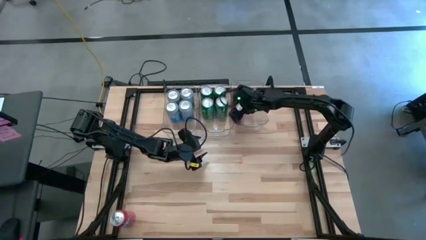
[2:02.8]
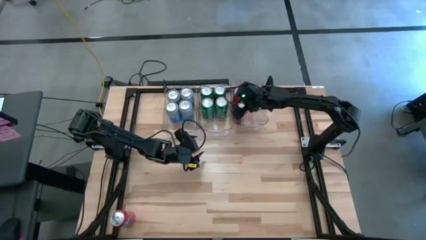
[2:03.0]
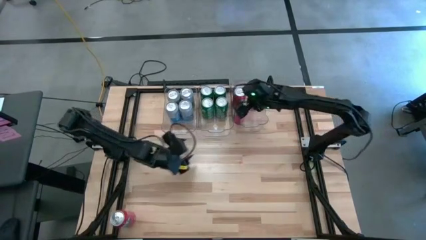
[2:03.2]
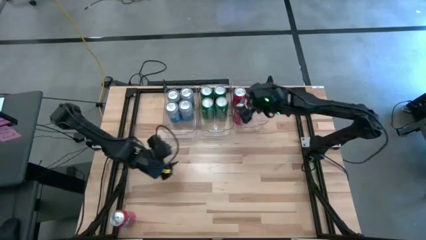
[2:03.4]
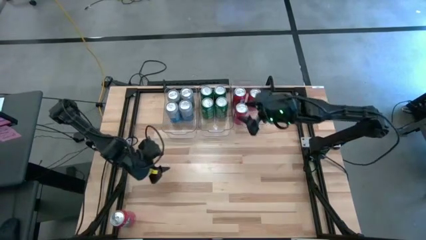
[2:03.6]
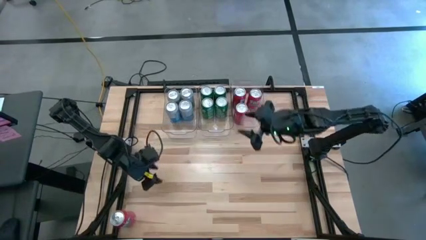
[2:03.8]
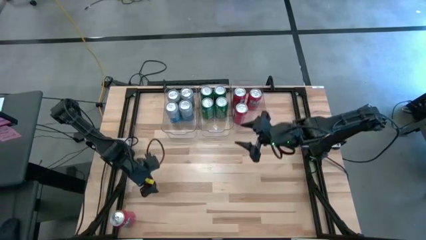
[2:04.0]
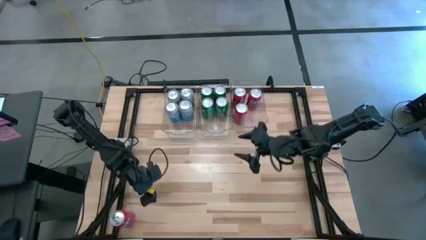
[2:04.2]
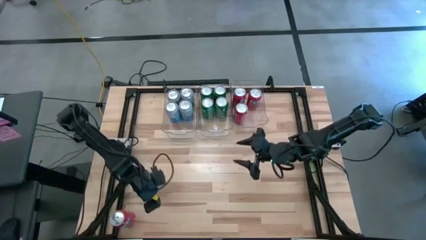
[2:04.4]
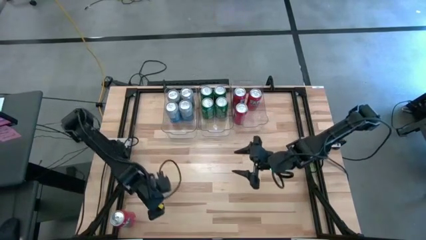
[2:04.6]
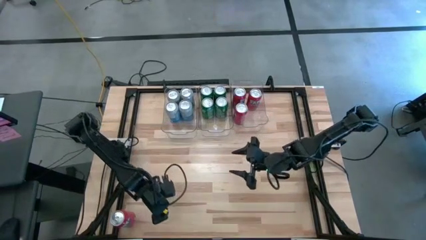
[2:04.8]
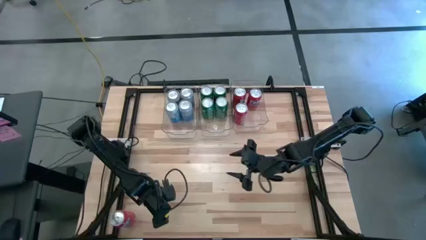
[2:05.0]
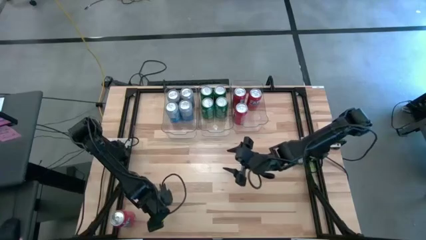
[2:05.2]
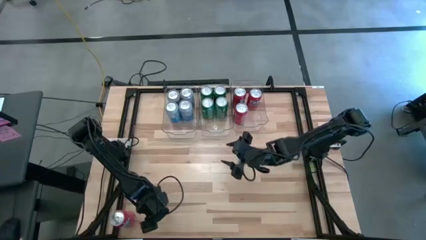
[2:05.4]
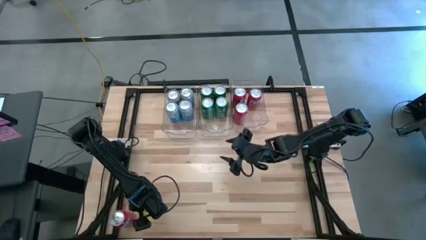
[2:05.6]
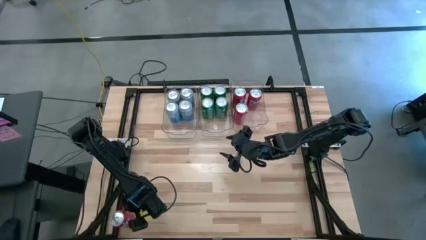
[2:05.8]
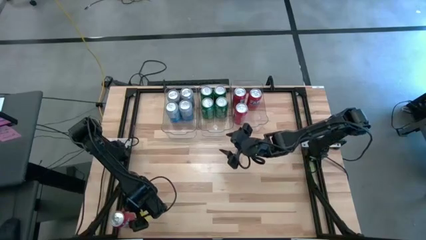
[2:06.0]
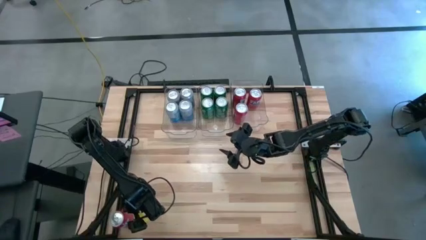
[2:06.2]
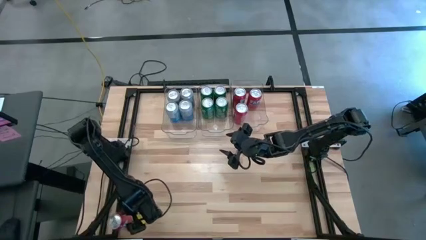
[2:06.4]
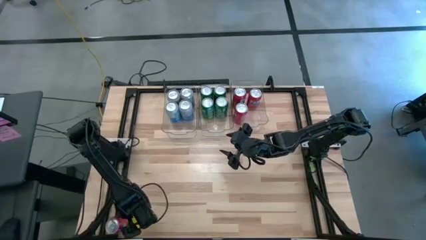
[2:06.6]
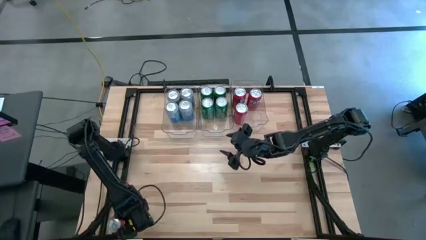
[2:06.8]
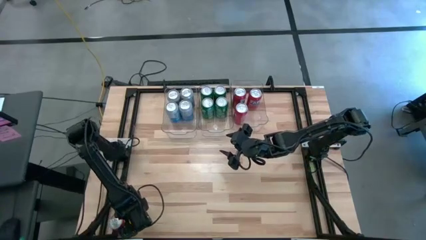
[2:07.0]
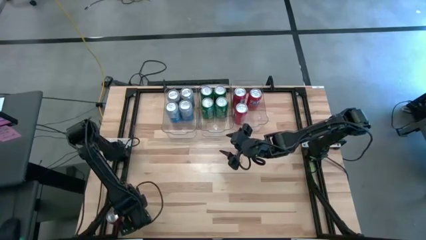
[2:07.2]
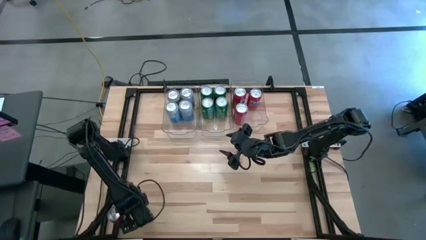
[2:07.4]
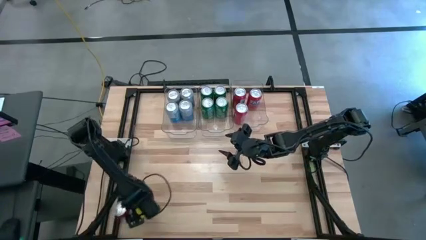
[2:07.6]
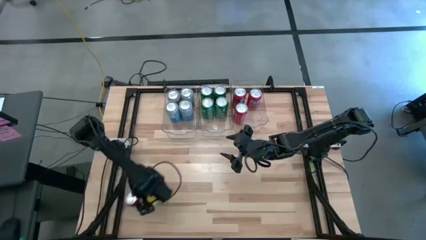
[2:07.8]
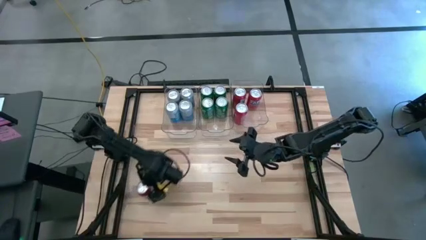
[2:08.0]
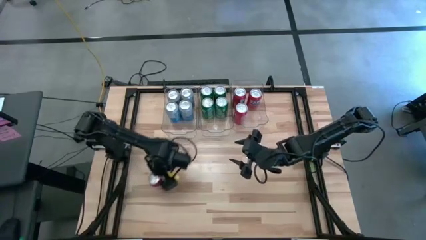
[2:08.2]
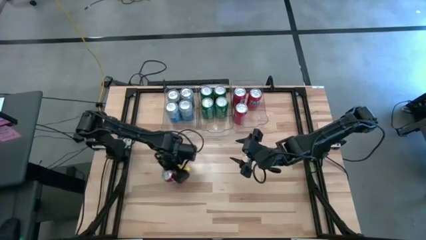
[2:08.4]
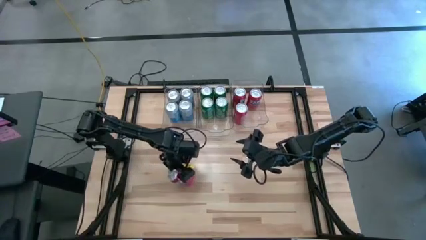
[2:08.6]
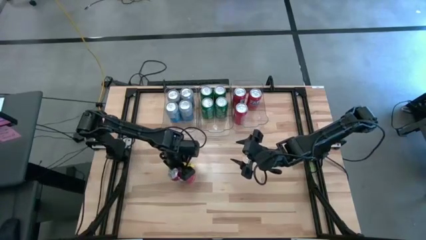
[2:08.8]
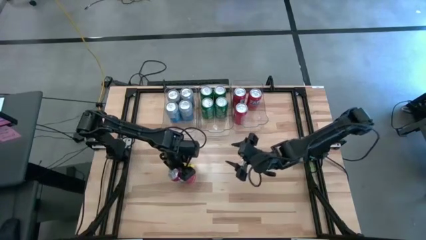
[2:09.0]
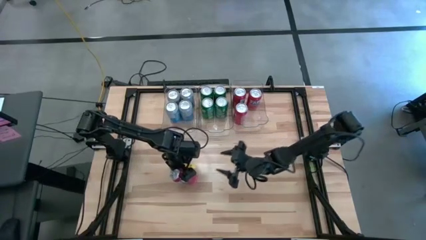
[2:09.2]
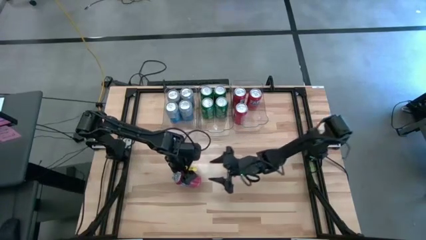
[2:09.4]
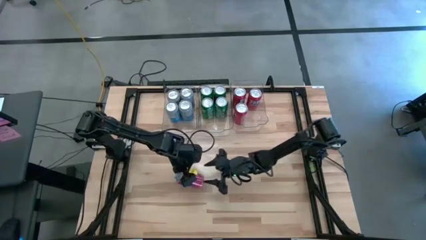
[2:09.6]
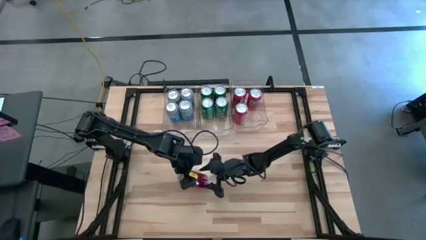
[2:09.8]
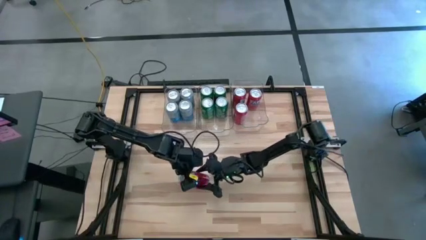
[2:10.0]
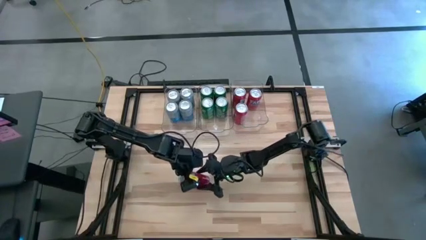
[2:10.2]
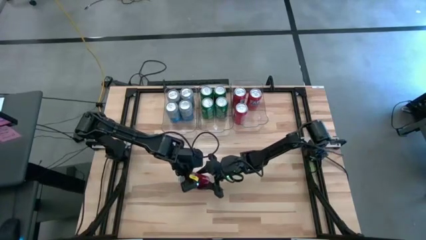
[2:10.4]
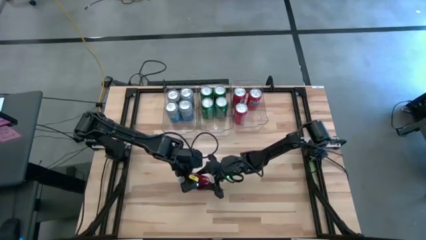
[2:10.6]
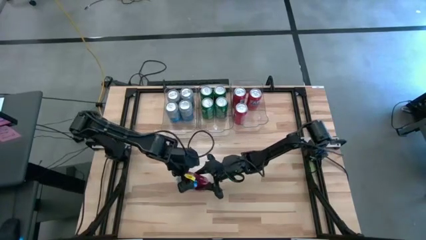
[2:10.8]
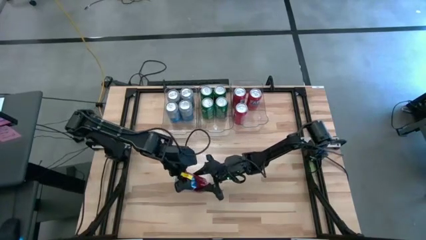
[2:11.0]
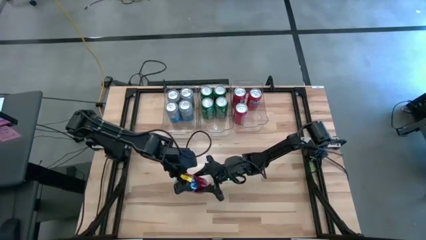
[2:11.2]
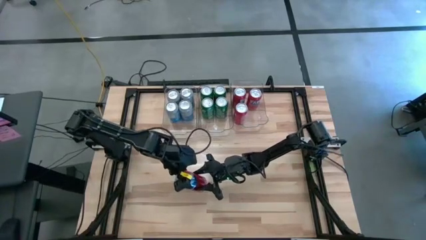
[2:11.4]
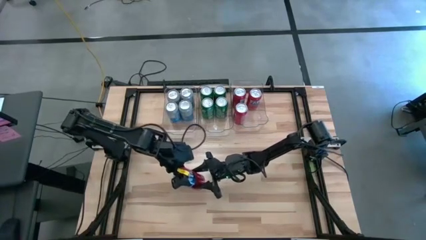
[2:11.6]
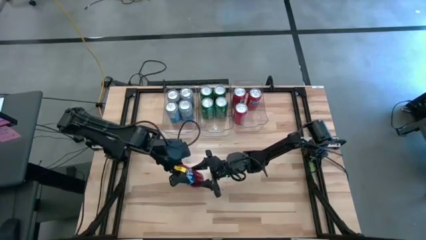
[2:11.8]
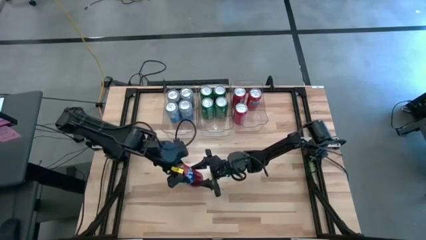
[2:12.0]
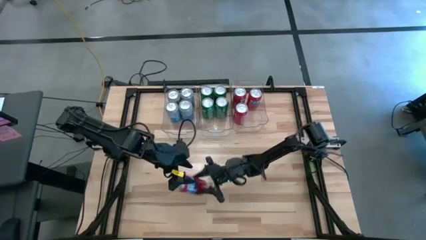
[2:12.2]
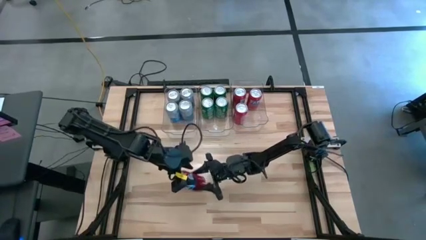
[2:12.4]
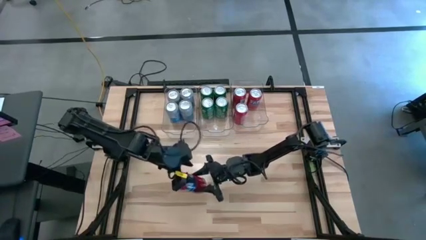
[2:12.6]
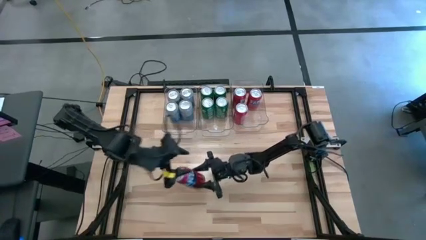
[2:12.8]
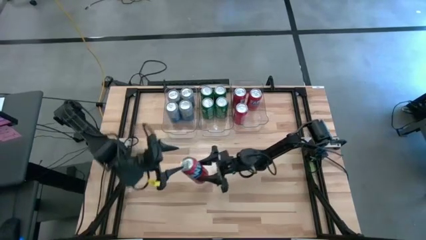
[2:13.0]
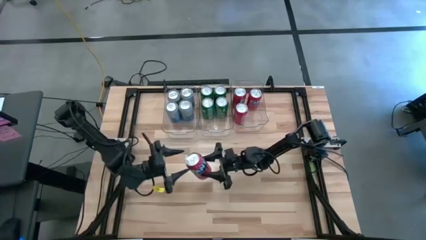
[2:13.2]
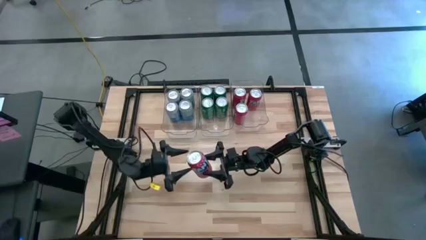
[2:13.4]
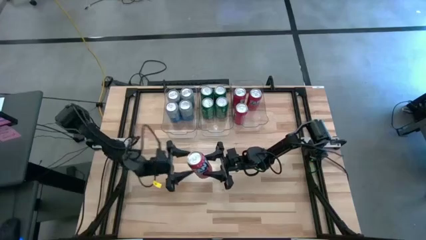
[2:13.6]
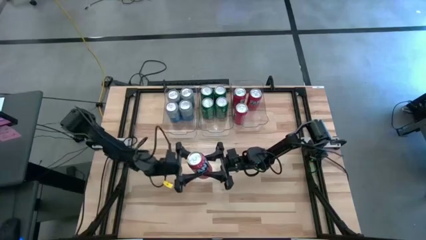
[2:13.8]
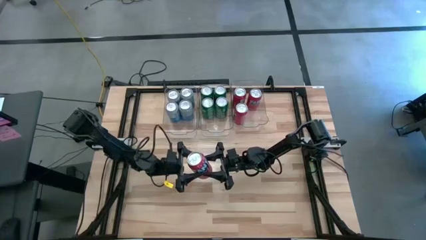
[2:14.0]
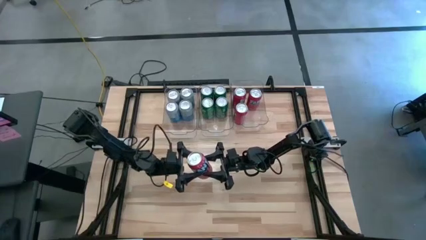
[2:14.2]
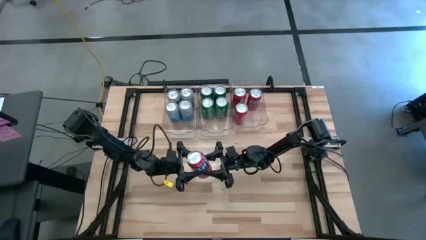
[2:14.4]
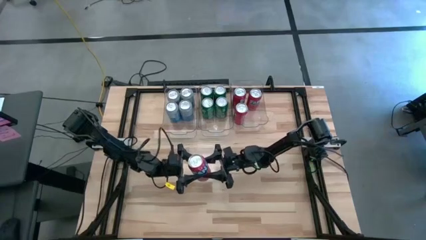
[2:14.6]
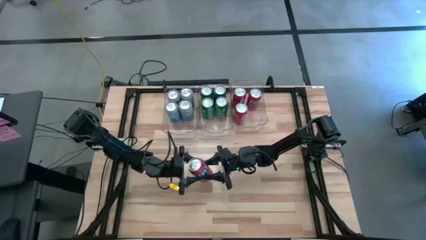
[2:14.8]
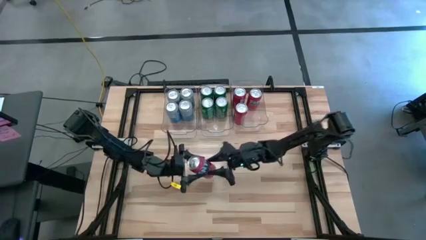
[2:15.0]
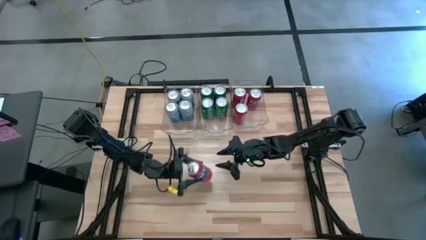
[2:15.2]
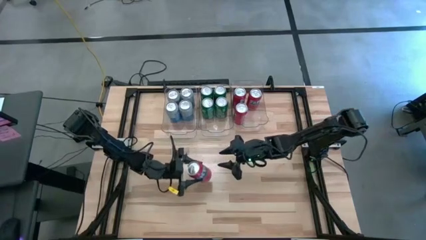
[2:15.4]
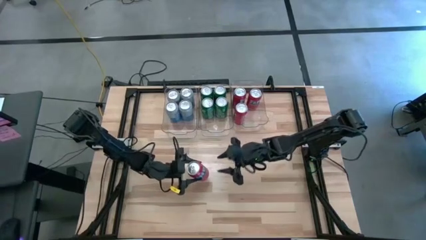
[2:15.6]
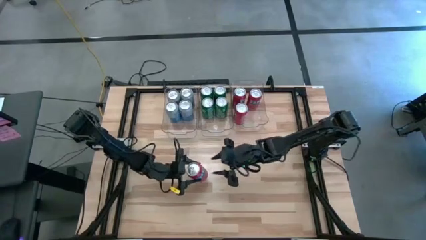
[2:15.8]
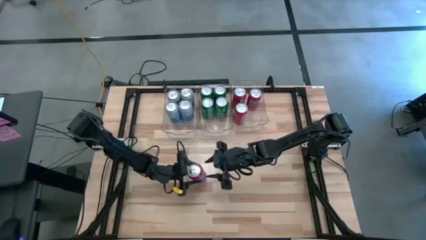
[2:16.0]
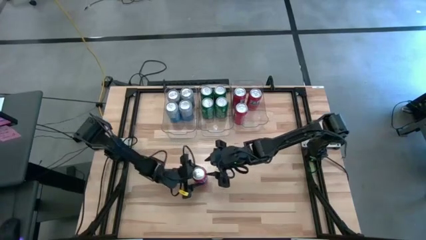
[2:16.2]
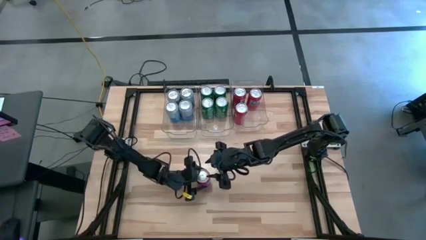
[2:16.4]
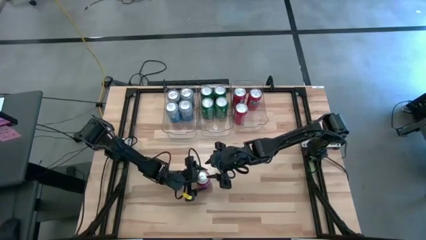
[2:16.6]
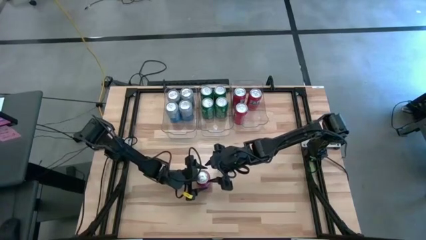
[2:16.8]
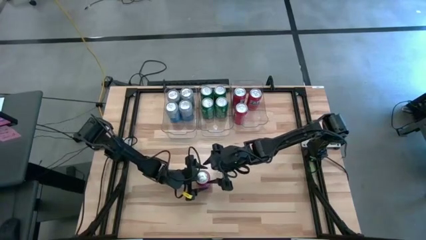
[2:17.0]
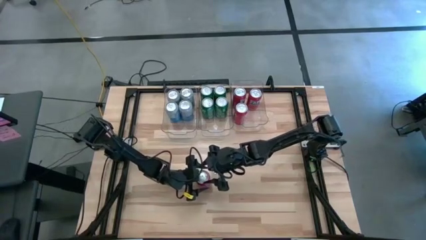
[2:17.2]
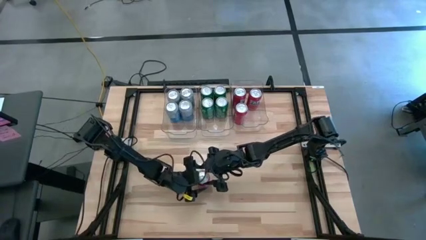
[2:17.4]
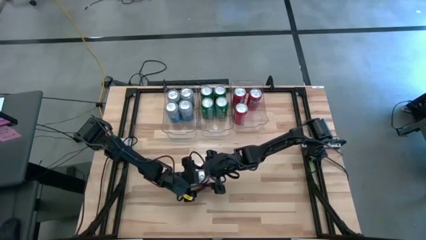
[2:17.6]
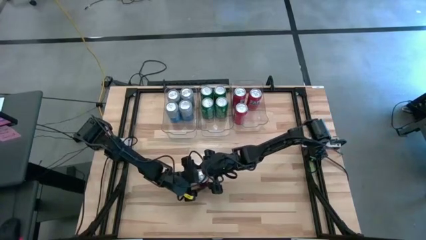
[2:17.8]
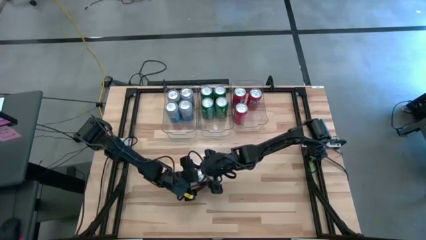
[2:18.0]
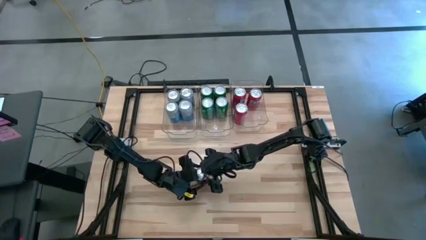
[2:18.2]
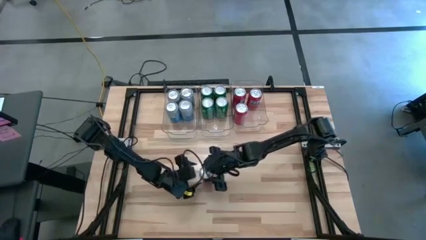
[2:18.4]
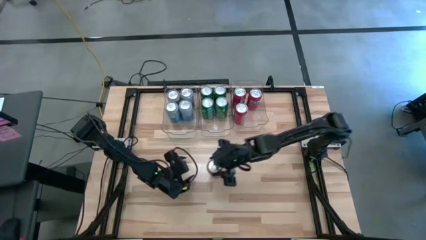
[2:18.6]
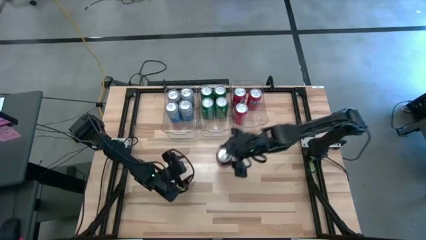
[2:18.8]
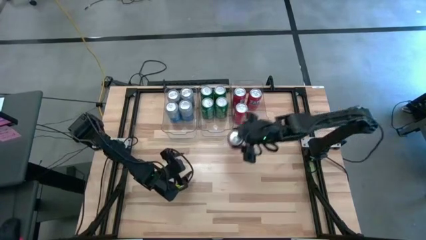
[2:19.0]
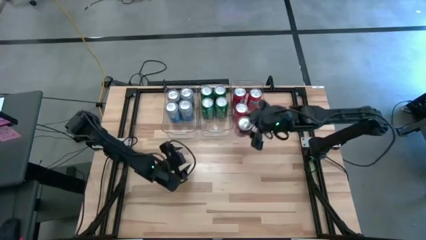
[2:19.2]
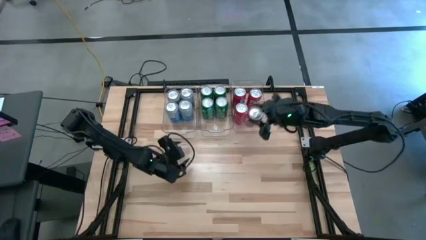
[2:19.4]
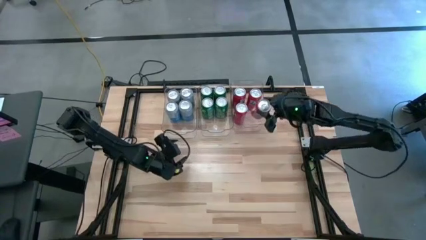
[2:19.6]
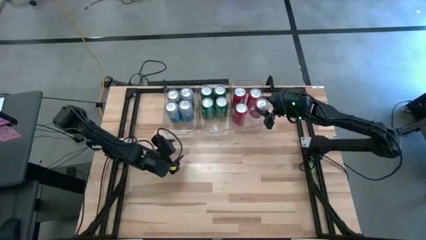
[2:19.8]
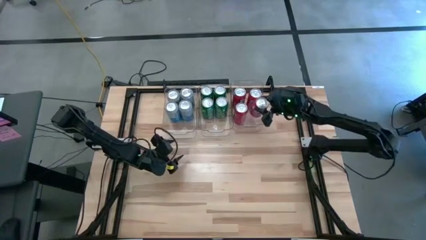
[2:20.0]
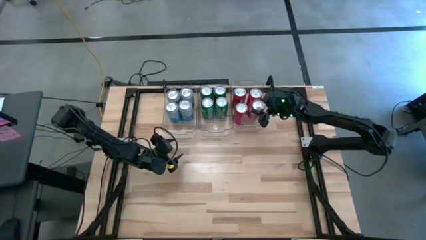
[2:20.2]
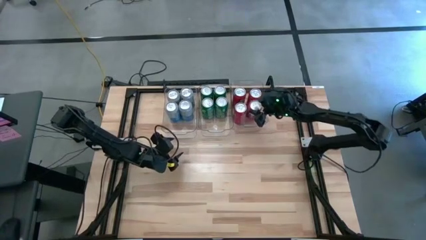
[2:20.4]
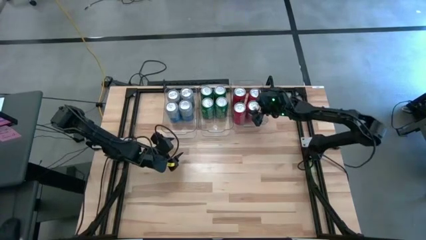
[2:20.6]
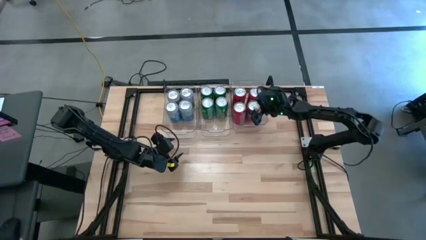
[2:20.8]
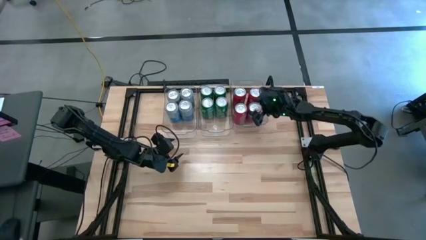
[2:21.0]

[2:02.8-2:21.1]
Task: Sort soda cans
Put the red soda can into the right transparent bin
